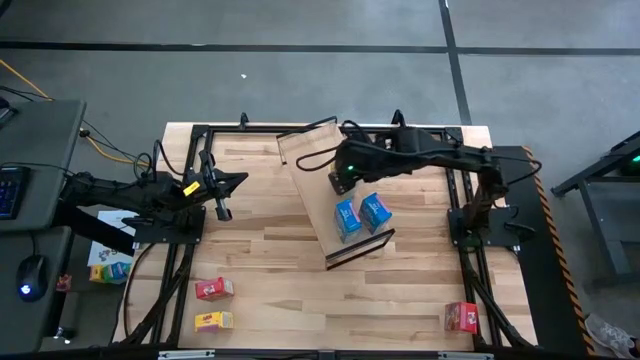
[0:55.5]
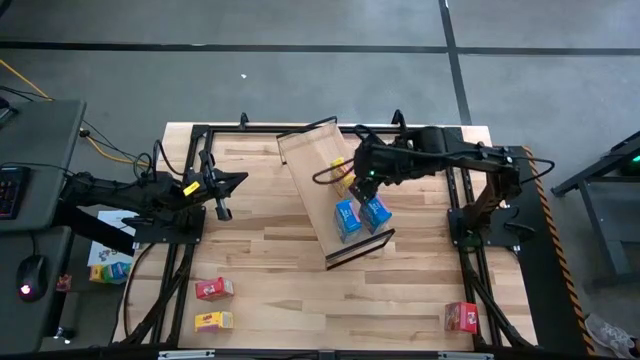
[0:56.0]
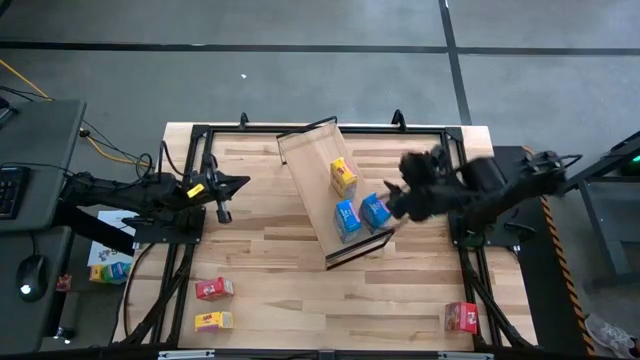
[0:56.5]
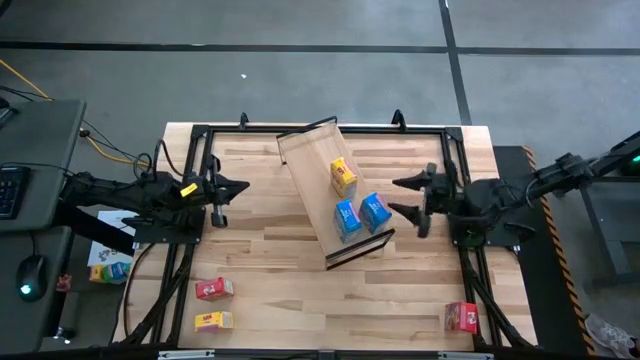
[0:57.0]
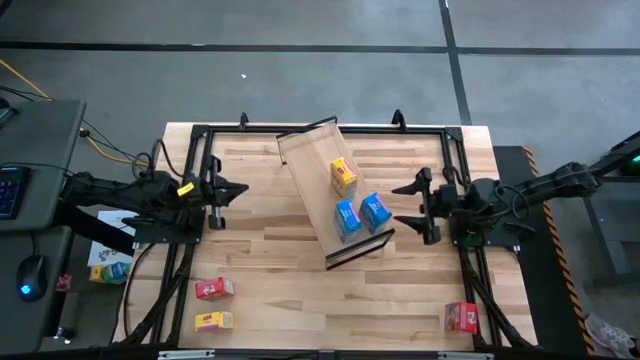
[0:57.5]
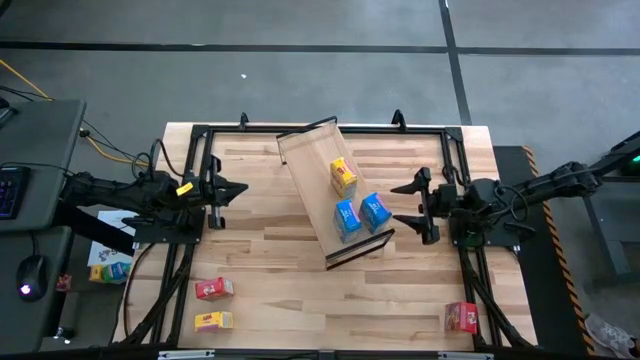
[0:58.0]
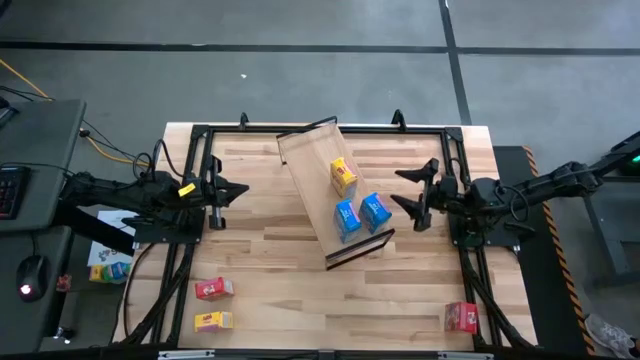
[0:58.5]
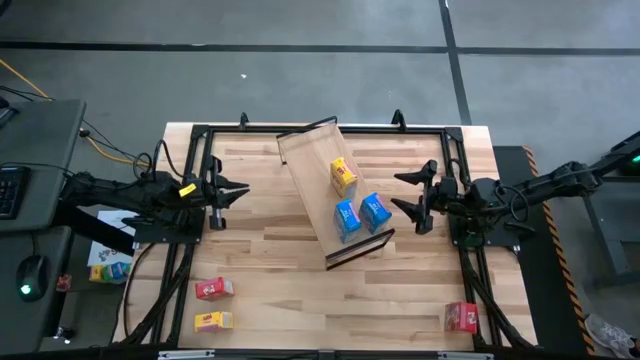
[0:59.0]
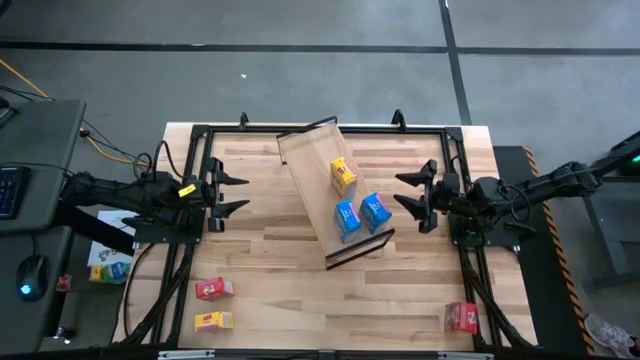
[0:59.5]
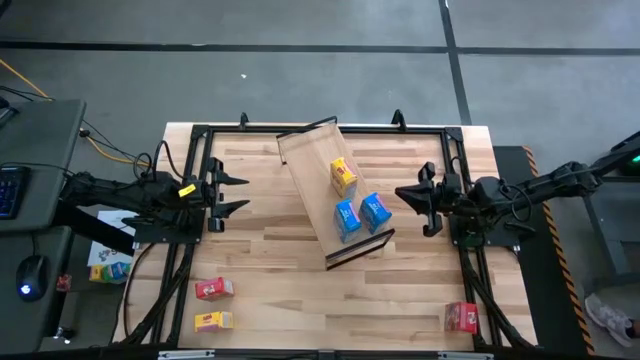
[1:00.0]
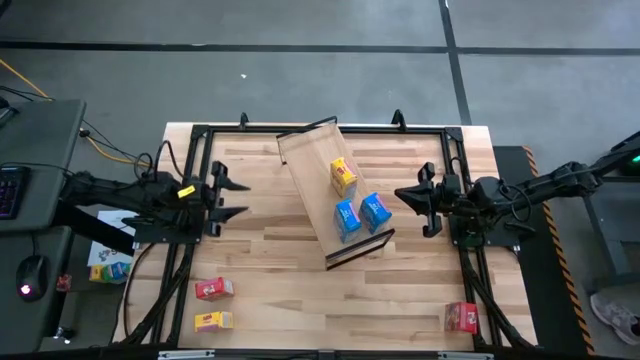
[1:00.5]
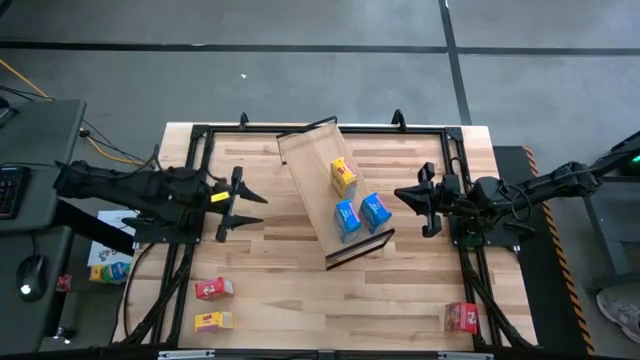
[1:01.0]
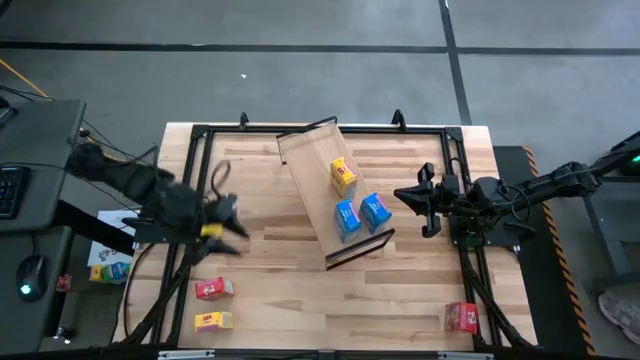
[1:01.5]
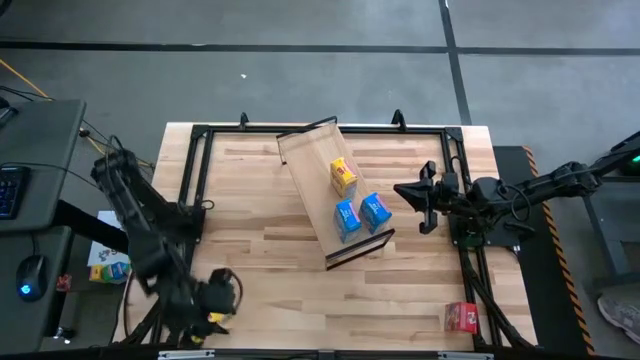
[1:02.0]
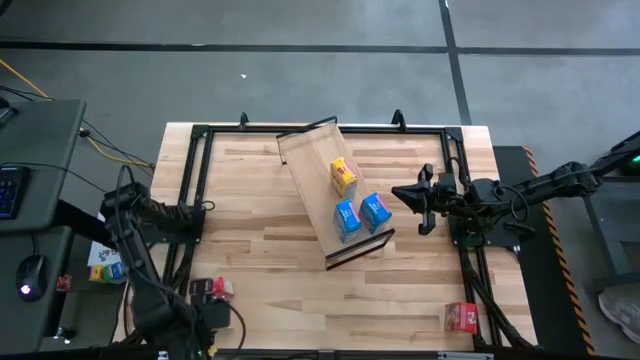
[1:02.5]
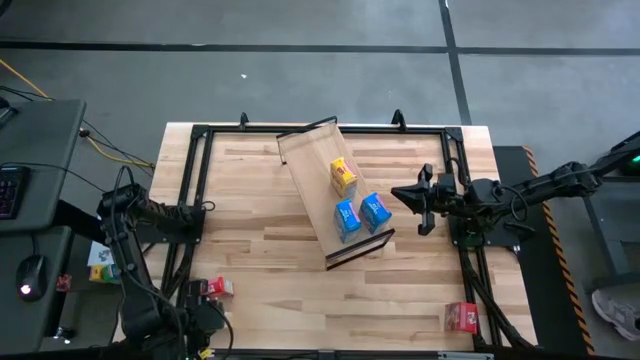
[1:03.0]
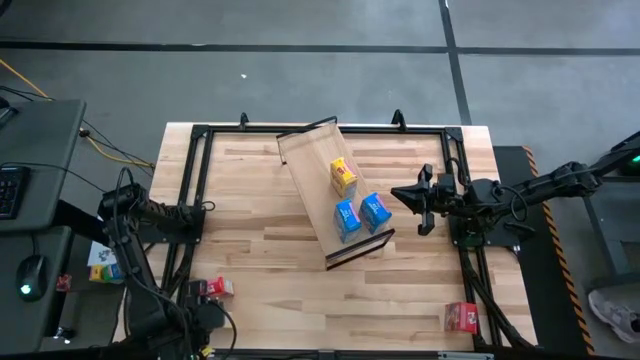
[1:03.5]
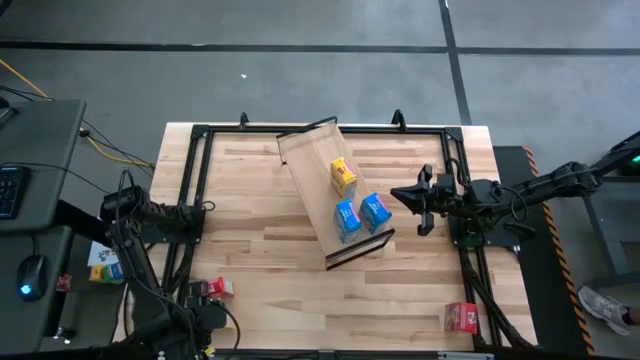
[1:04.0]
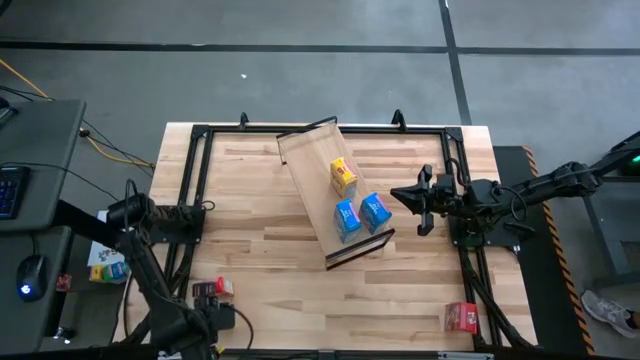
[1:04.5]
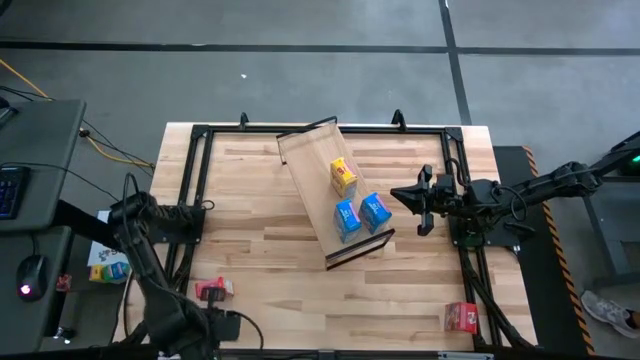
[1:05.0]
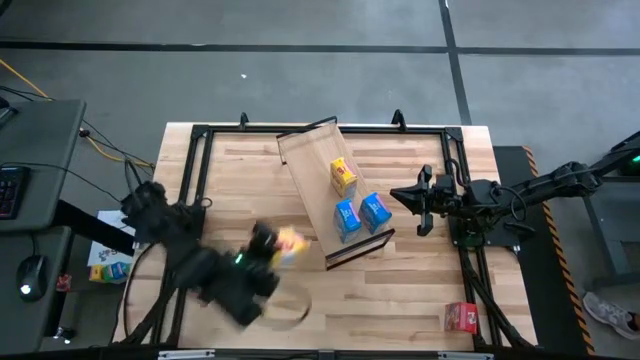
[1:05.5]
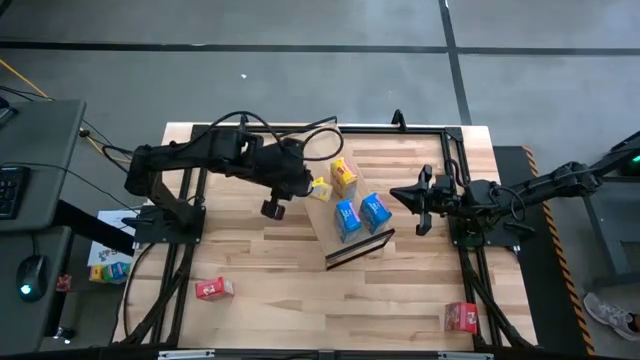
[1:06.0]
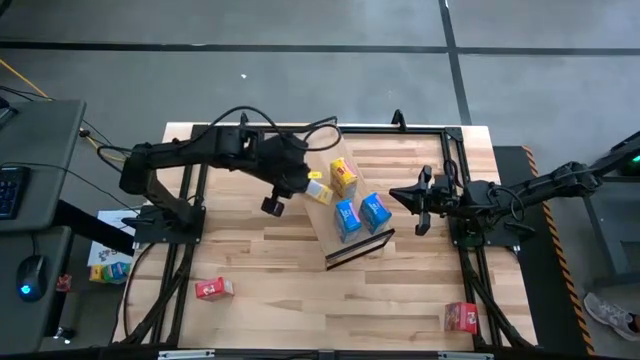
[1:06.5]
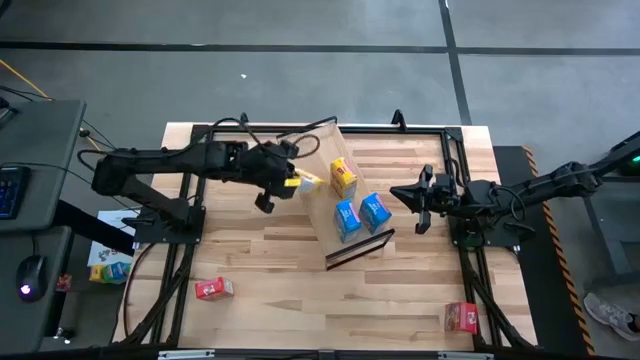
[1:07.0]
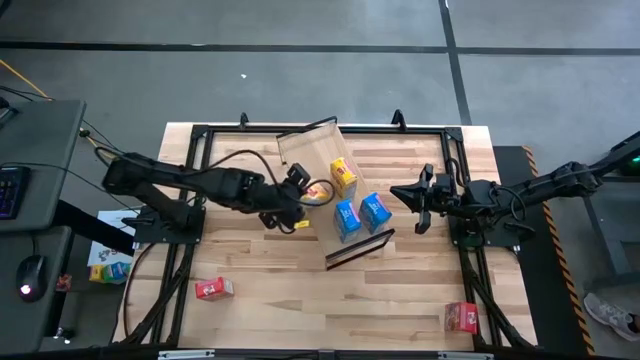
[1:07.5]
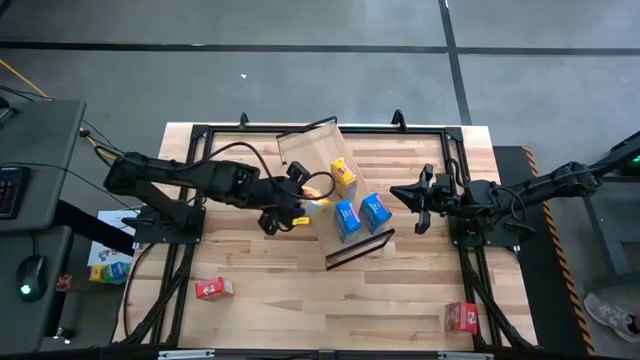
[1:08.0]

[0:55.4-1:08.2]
Task: Stack cereal on shelf
Put the yellow cereal box on the shelf aligned with the other yellow cereal box

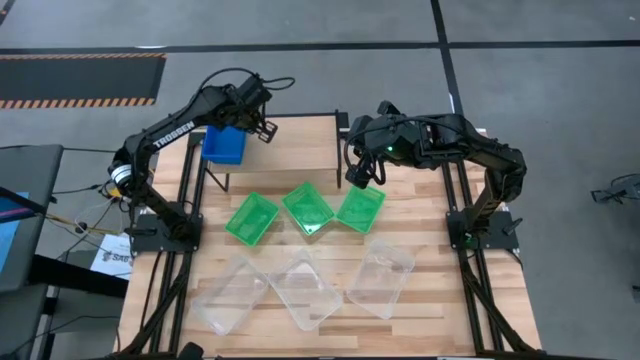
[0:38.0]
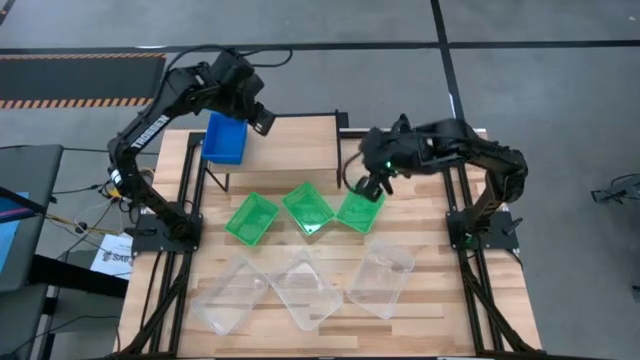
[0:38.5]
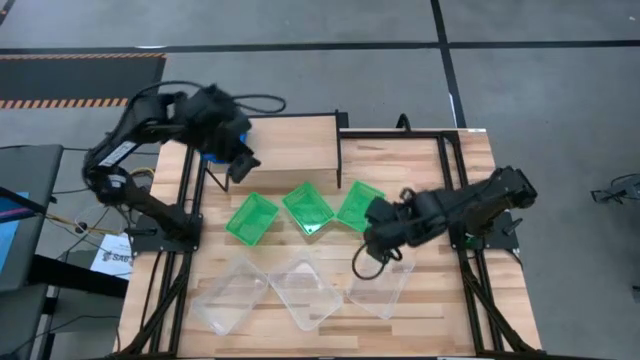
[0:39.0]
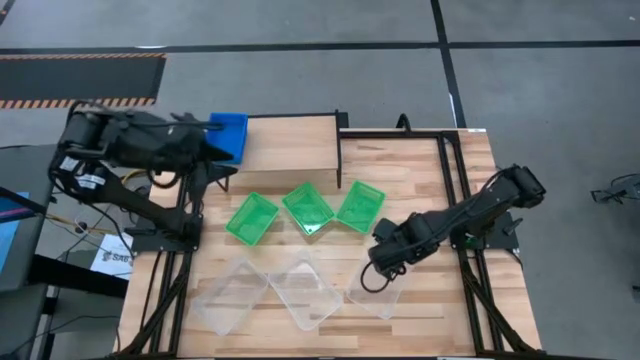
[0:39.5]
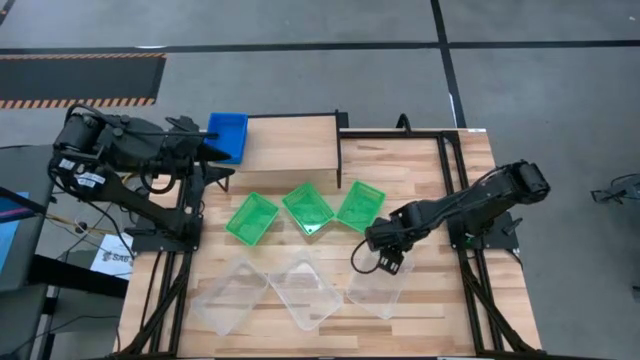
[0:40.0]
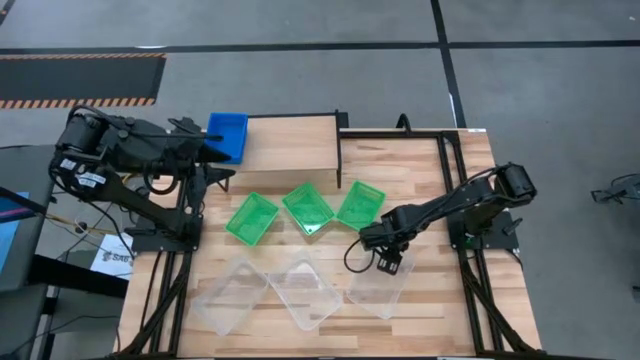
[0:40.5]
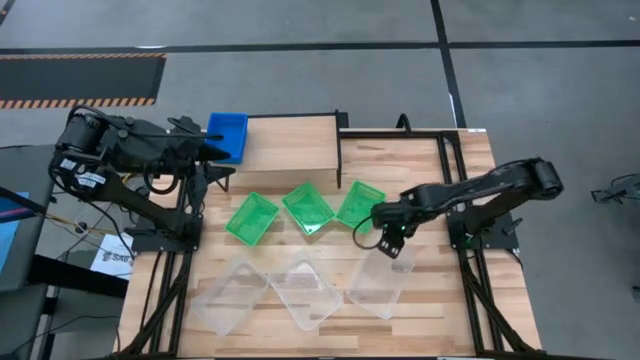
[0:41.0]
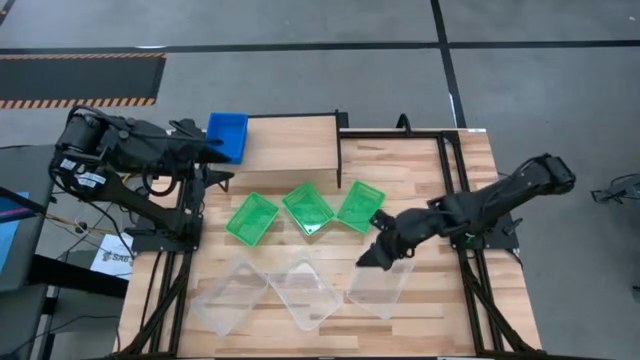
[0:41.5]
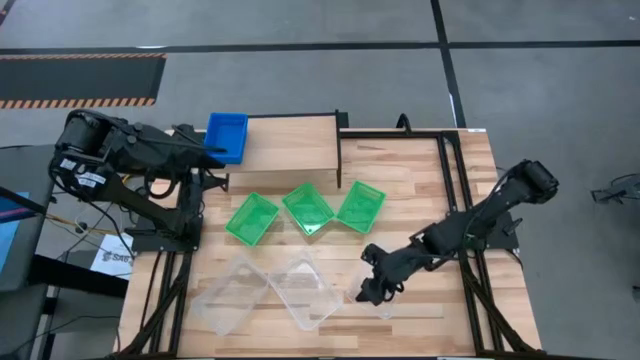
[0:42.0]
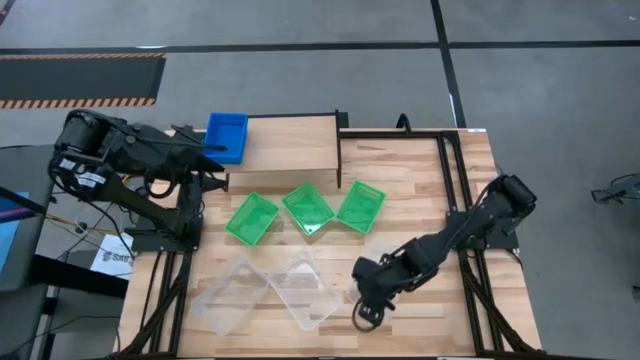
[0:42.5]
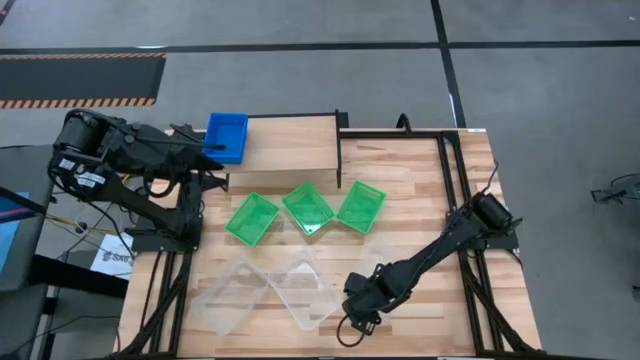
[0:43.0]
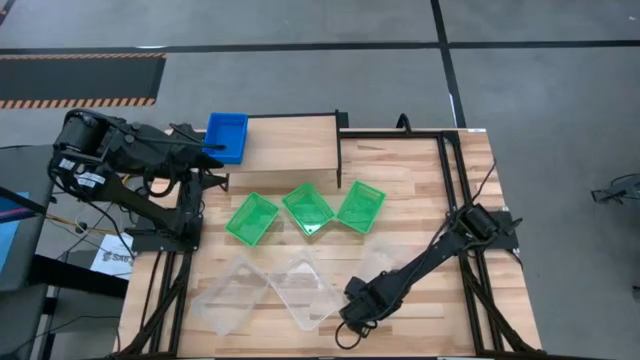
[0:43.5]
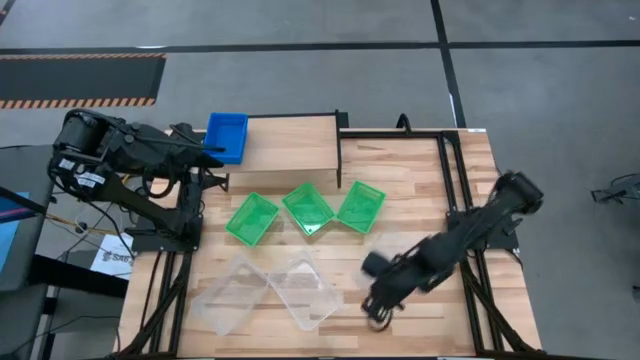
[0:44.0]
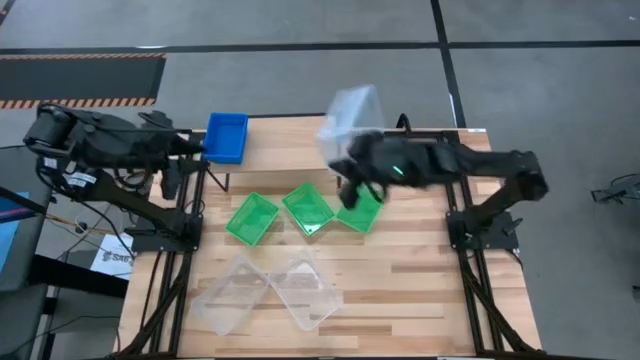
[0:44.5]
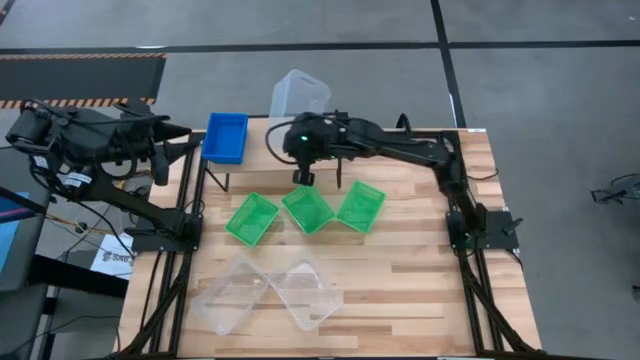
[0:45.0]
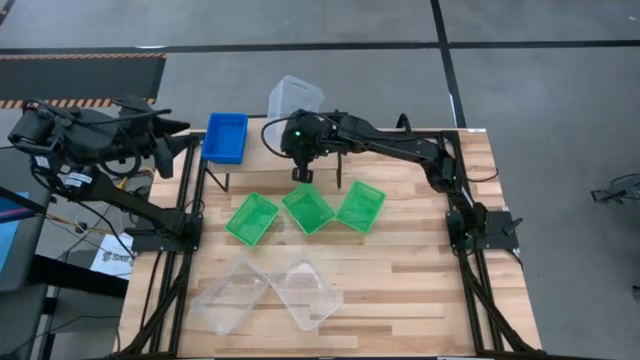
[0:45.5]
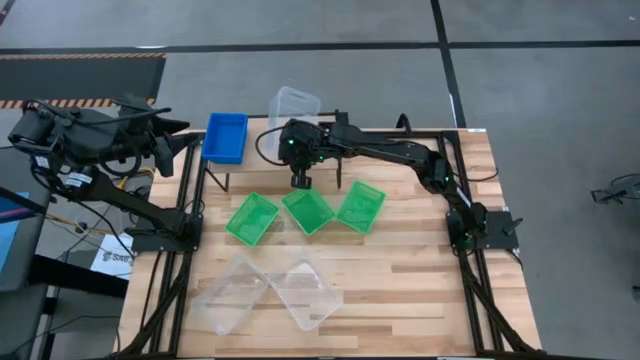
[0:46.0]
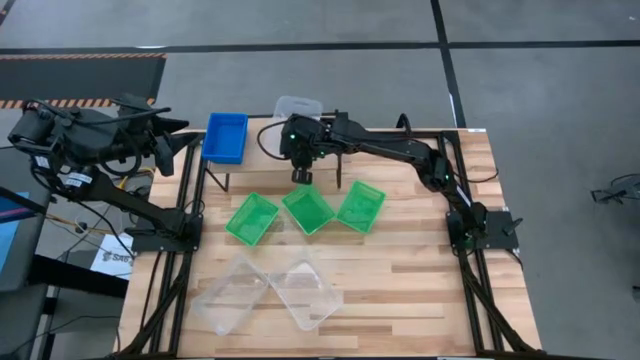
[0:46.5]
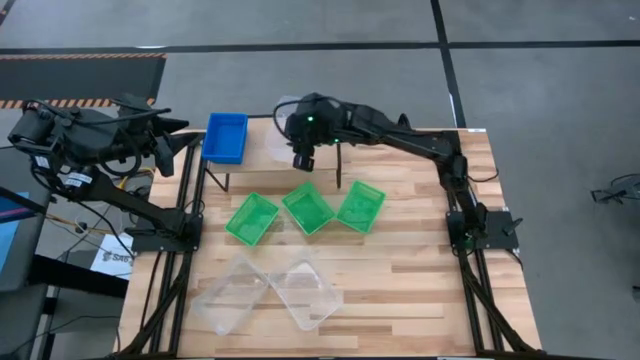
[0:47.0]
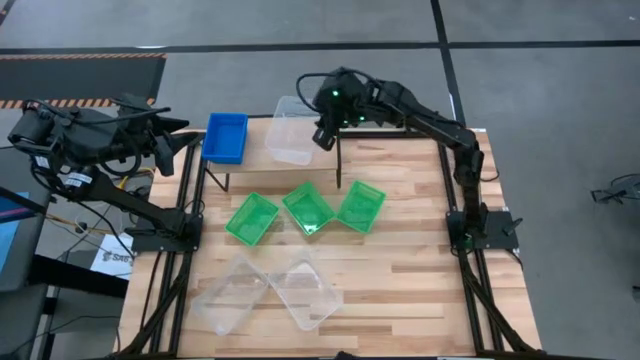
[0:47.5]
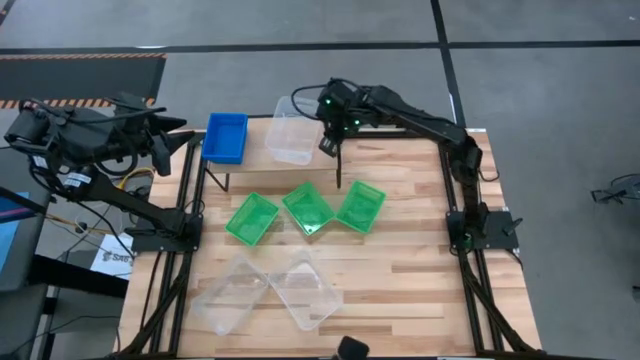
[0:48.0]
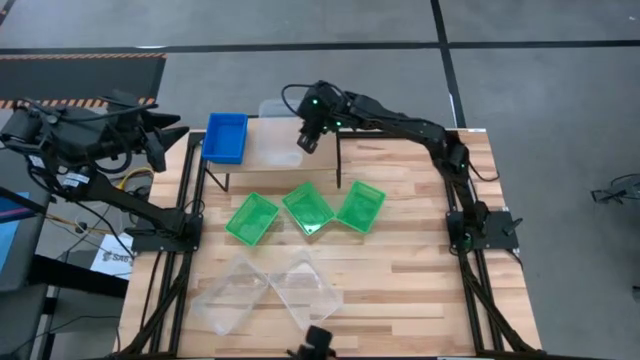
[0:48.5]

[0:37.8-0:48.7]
Task: Stack baskets on shelf by color
Put the right transparent bin on the shelf
